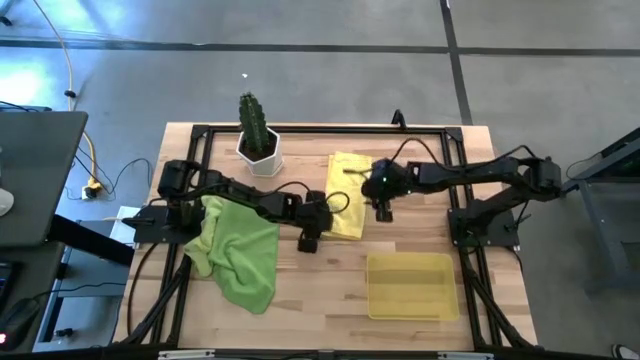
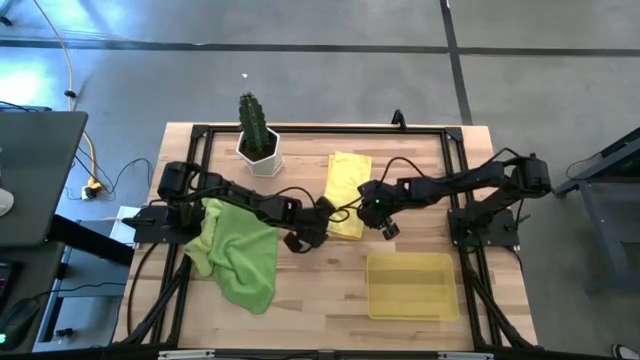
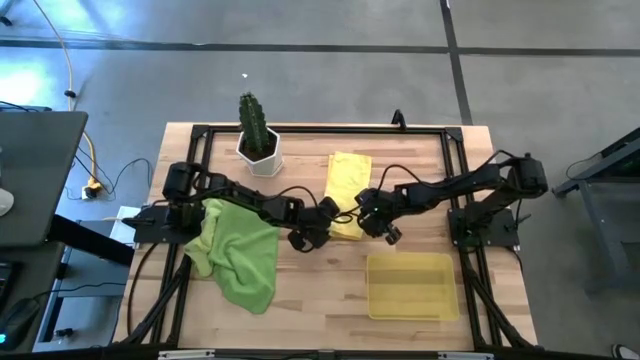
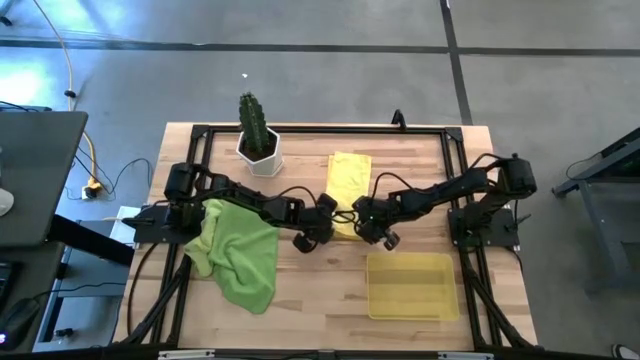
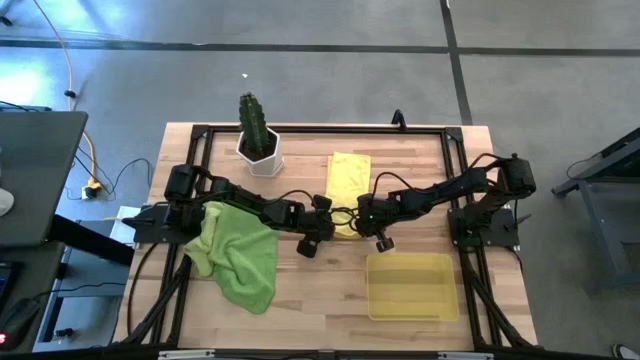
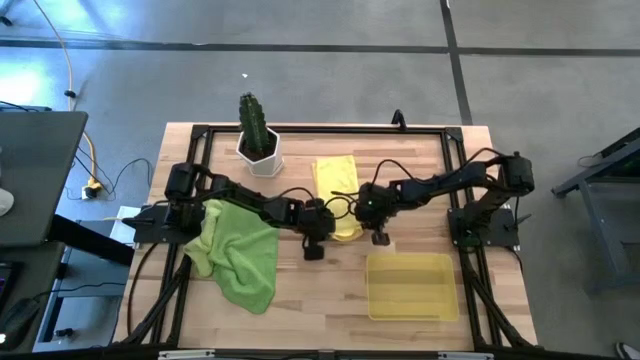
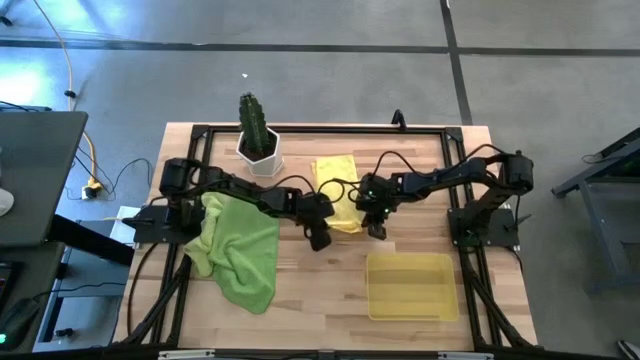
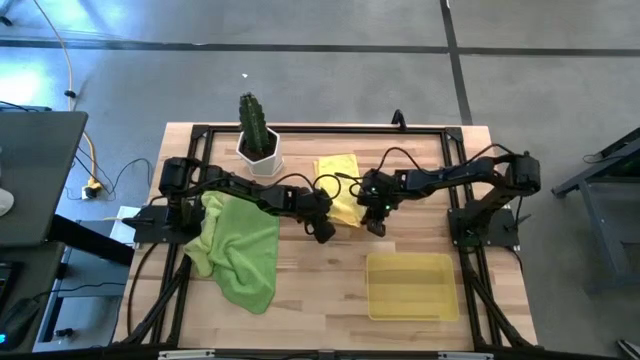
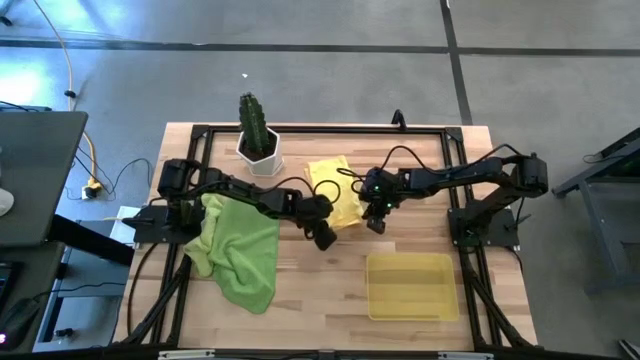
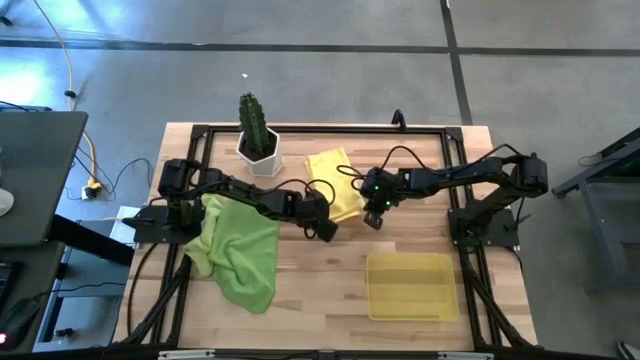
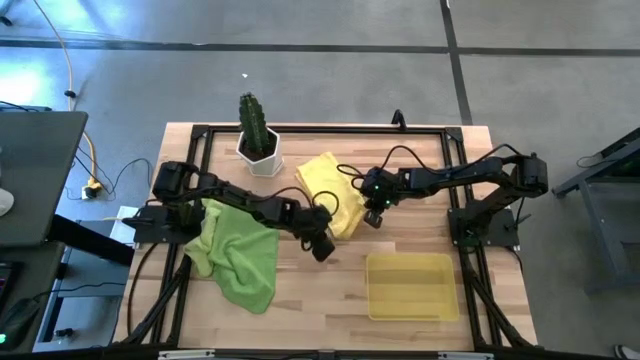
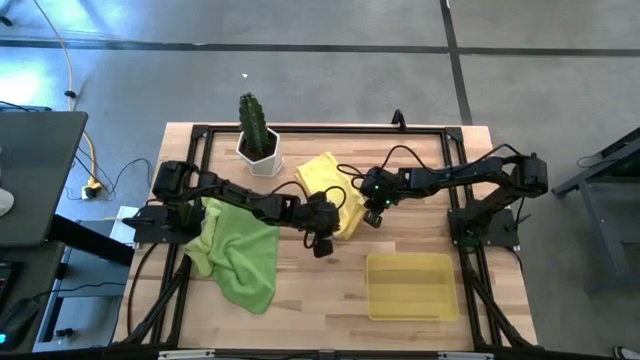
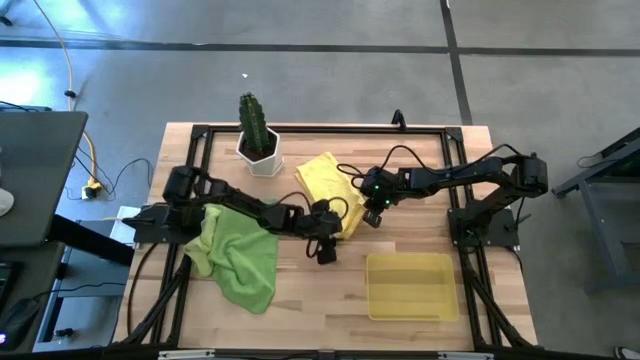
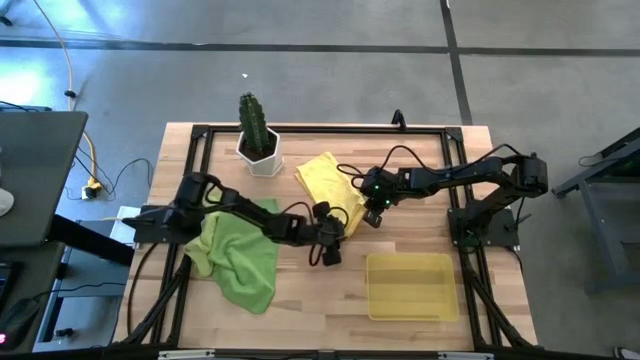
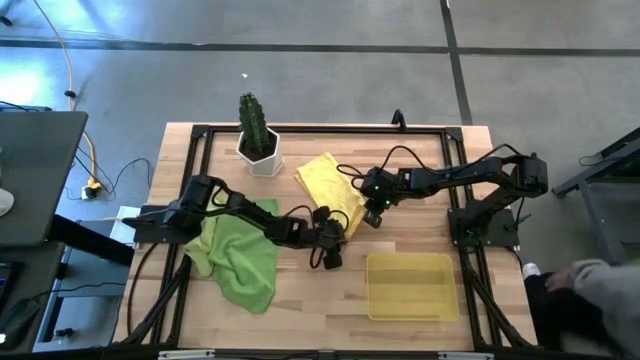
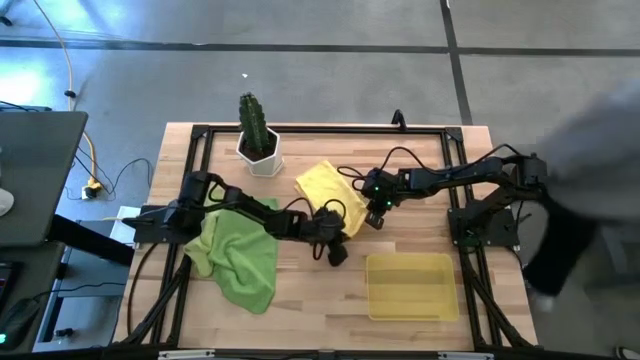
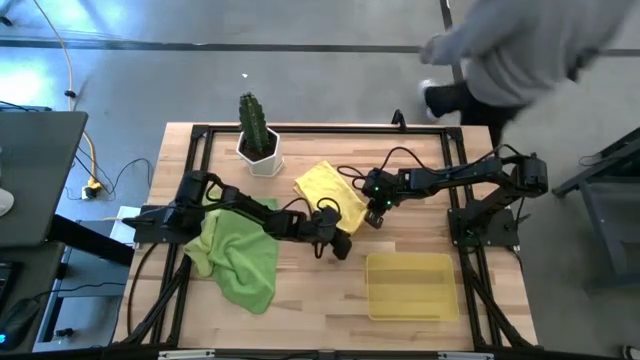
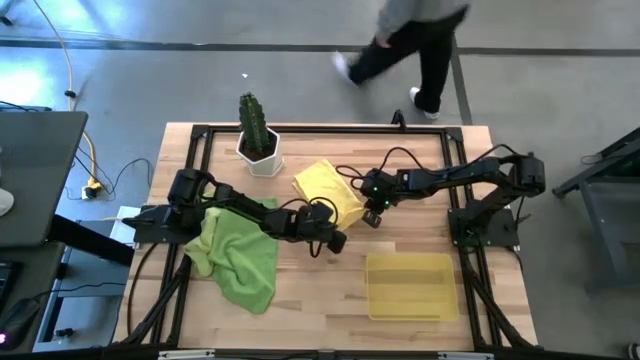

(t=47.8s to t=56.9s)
Task: Roll microfiber towels into tight, uniform cylinder then place into a basket
Roll the yellow towel

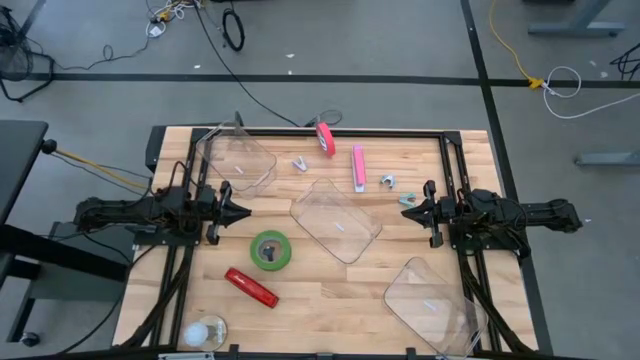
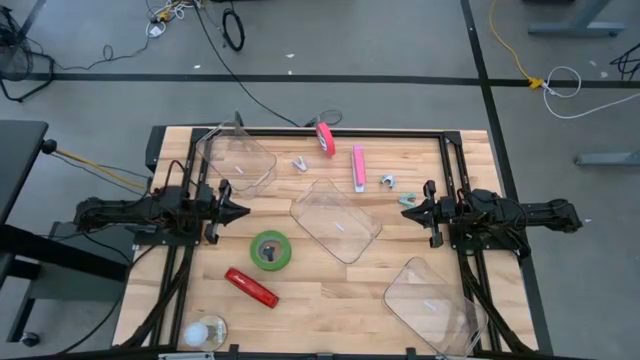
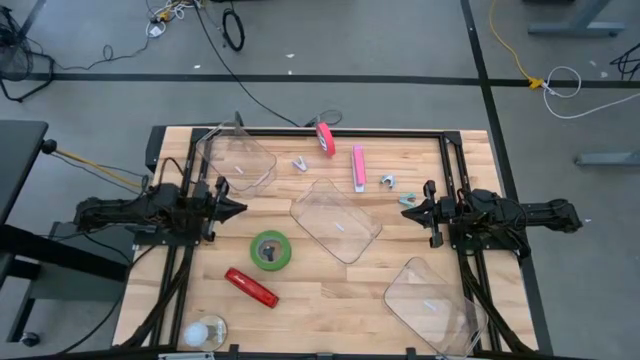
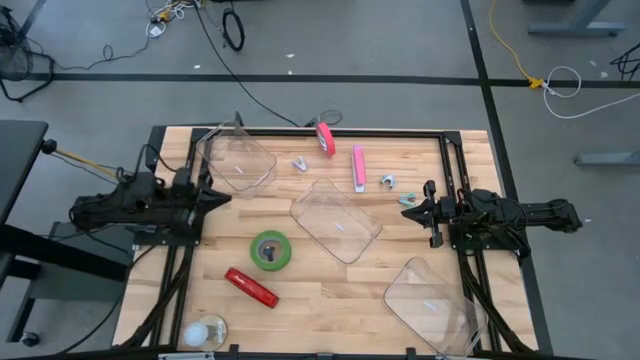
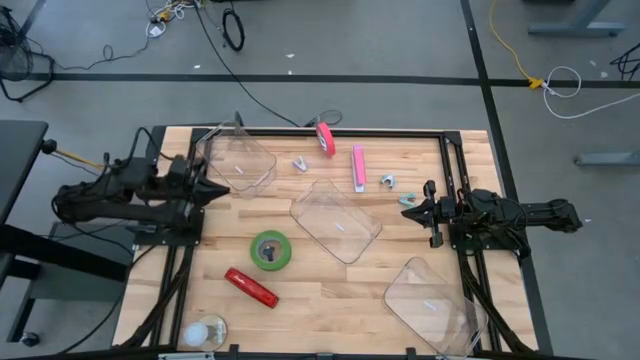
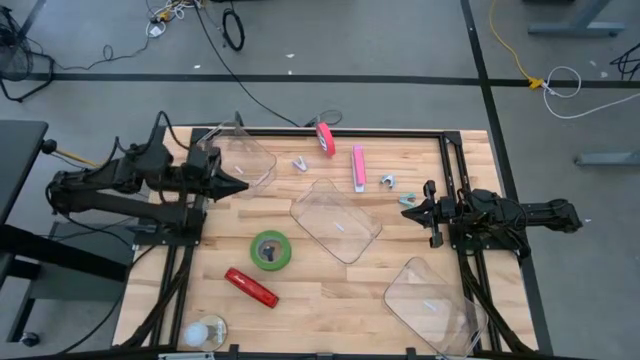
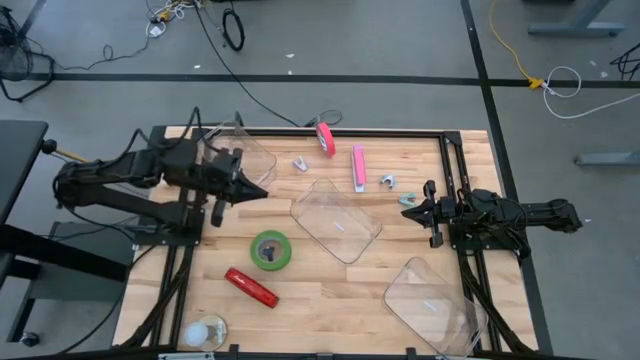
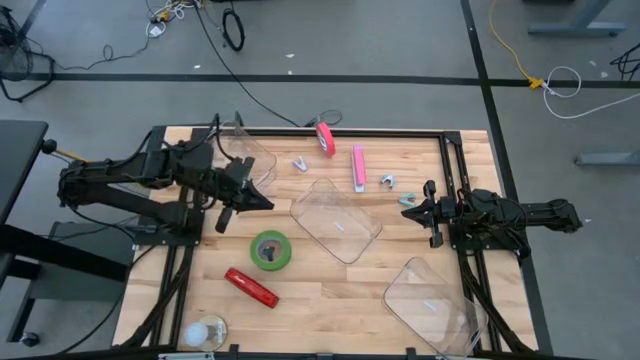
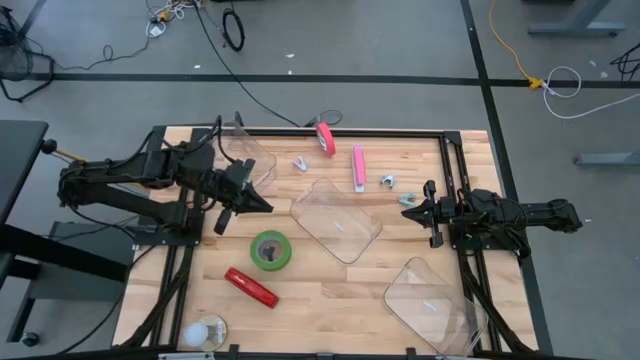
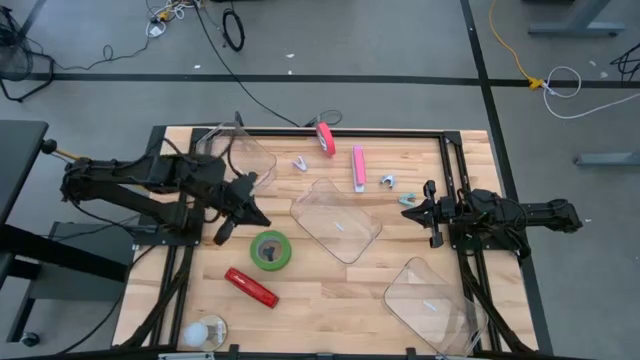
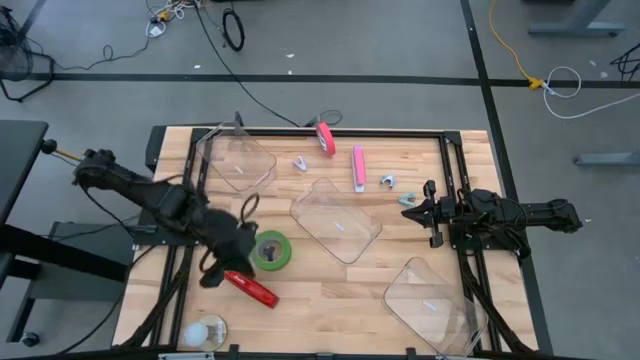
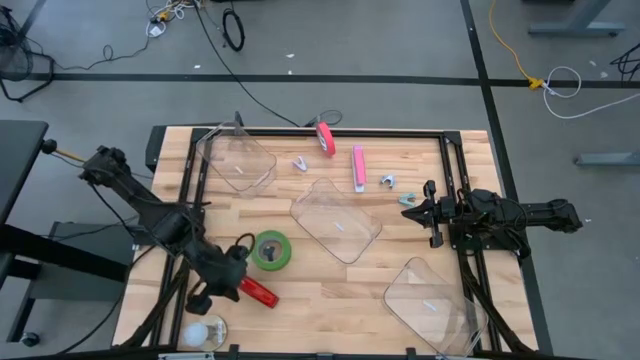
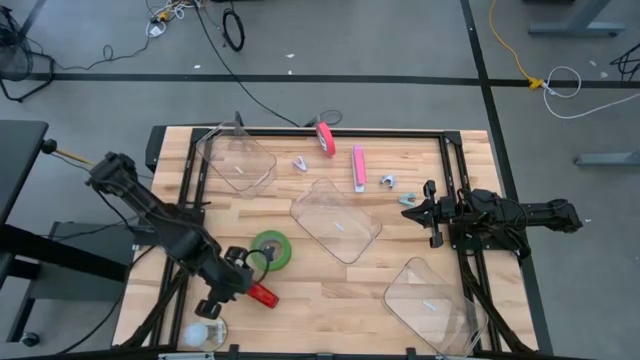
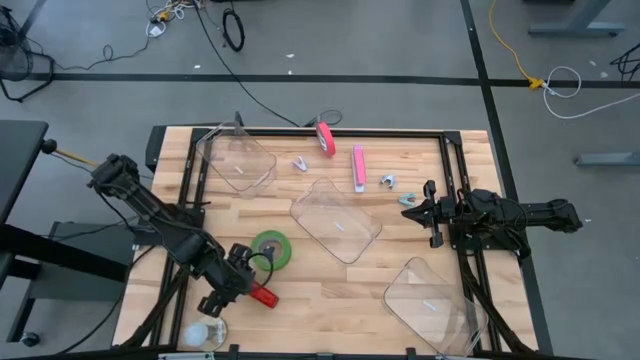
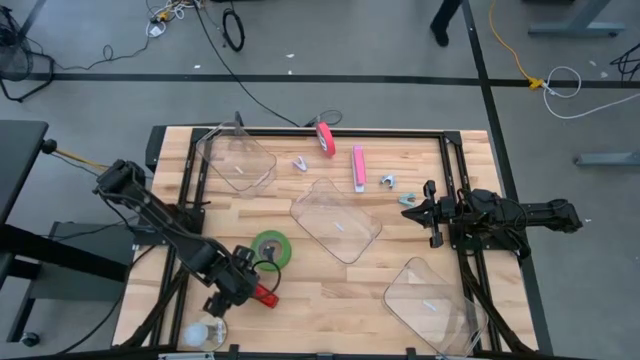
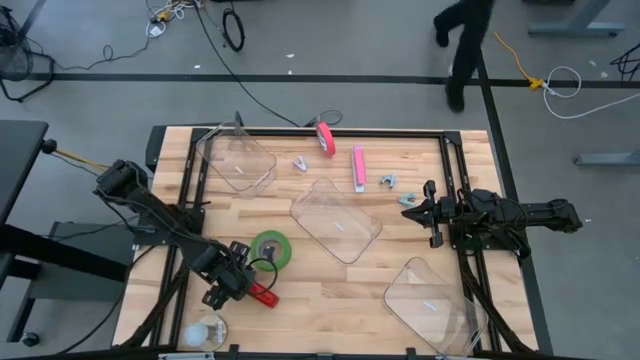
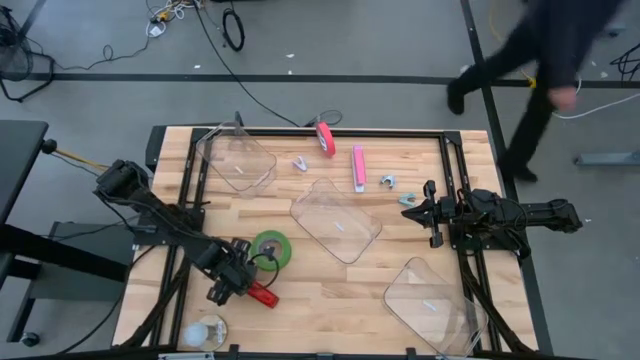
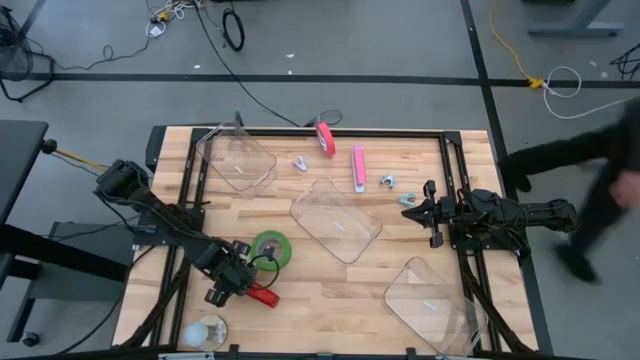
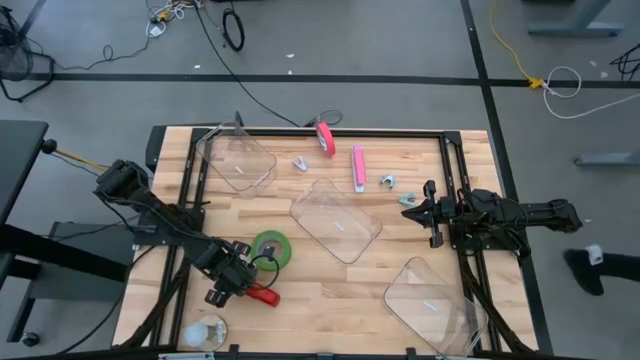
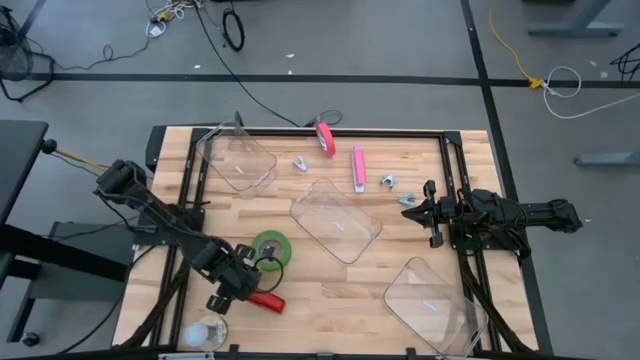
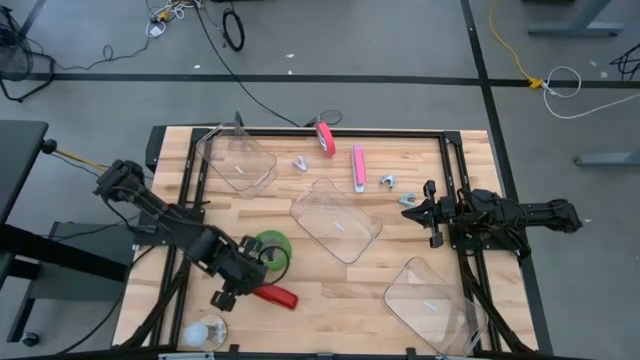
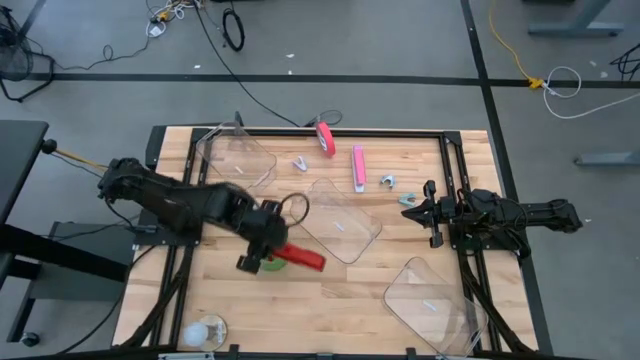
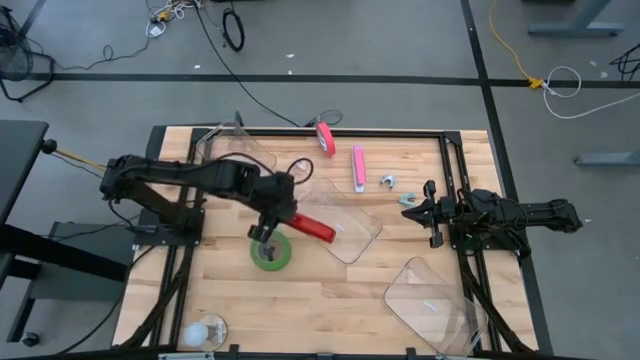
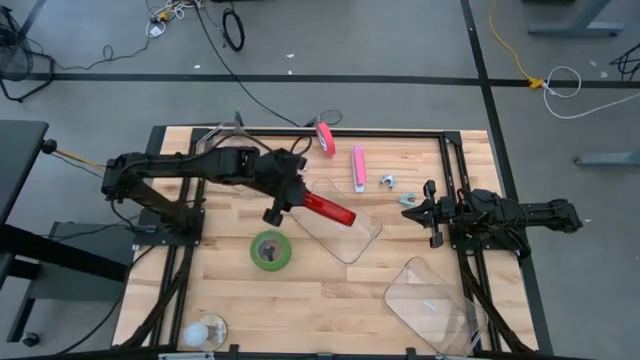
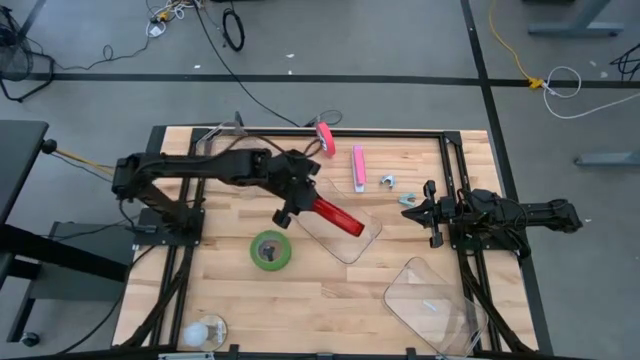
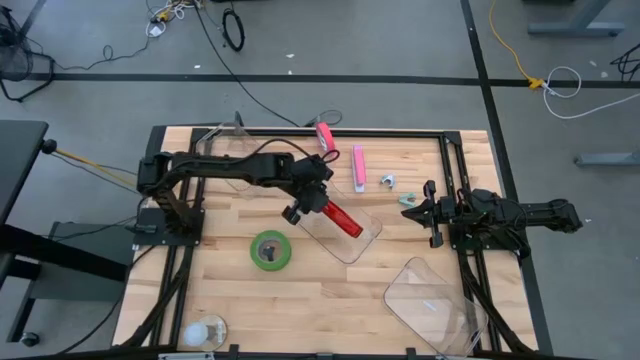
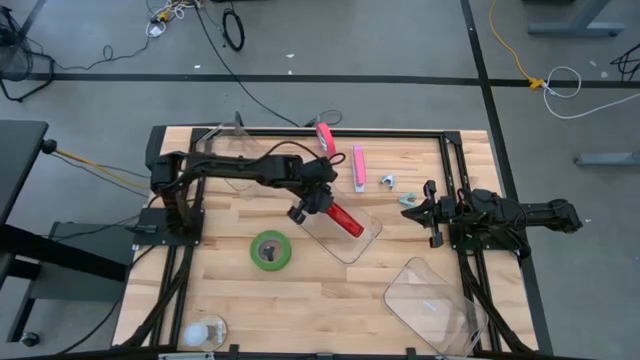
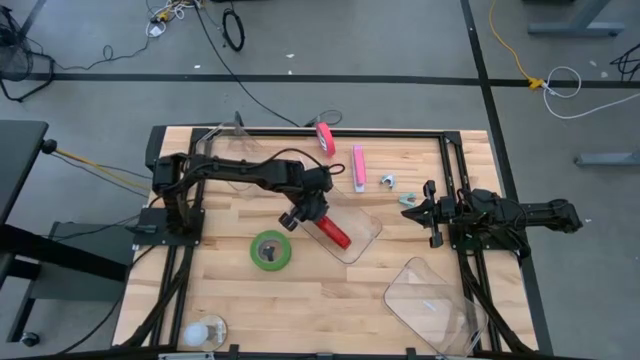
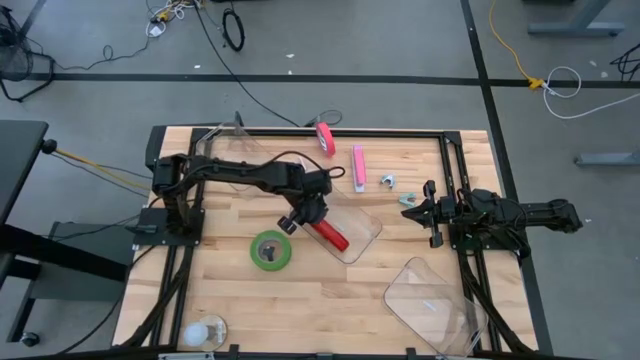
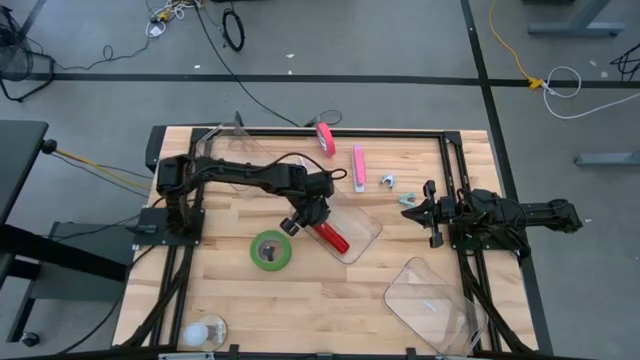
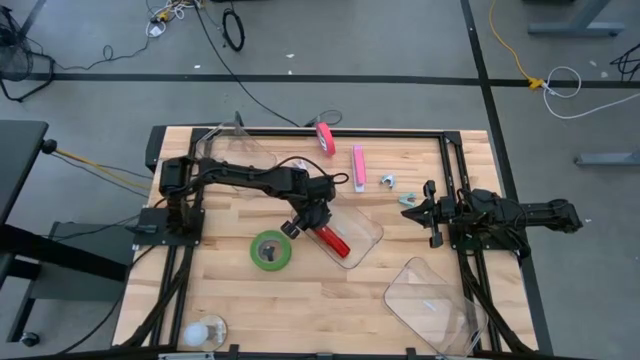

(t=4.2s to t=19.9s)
Task: Pick and place Stapler, Stapler remover, tape
Put the red stapler into the center transparent bin
